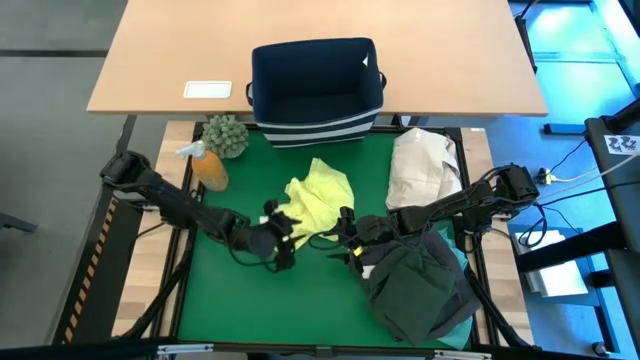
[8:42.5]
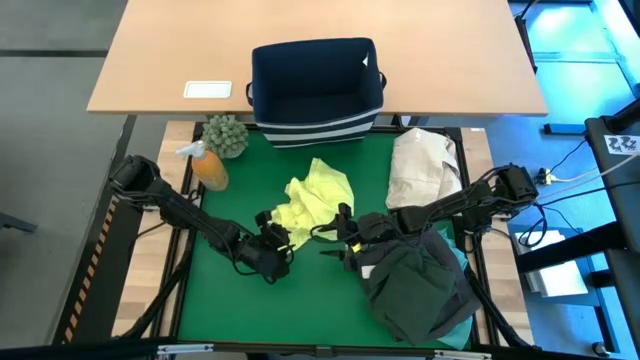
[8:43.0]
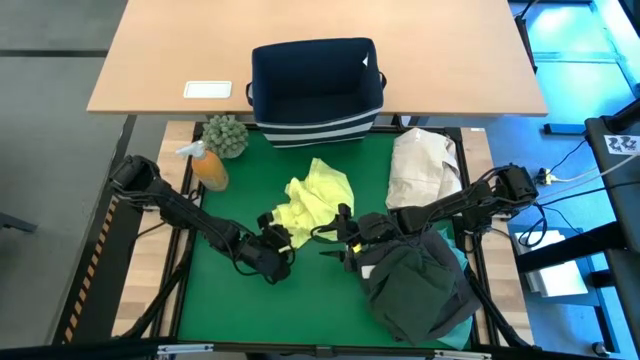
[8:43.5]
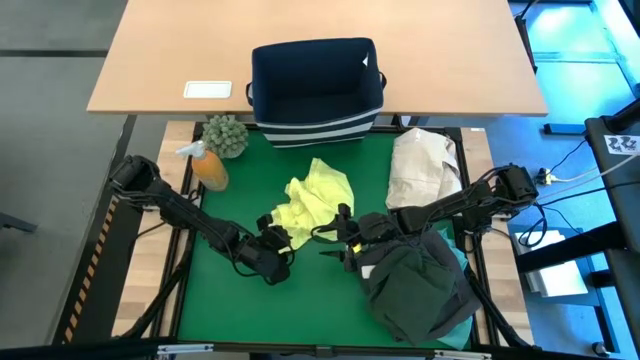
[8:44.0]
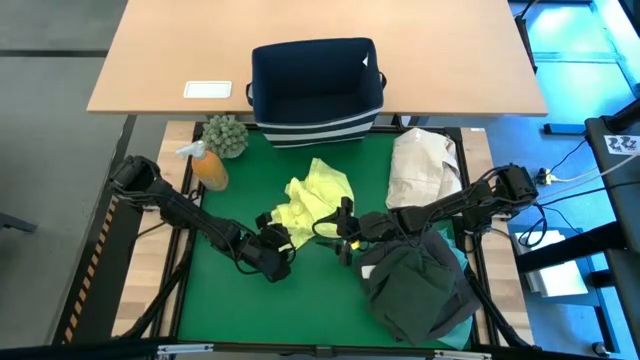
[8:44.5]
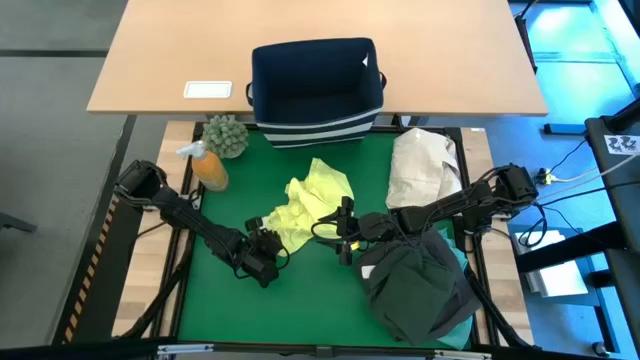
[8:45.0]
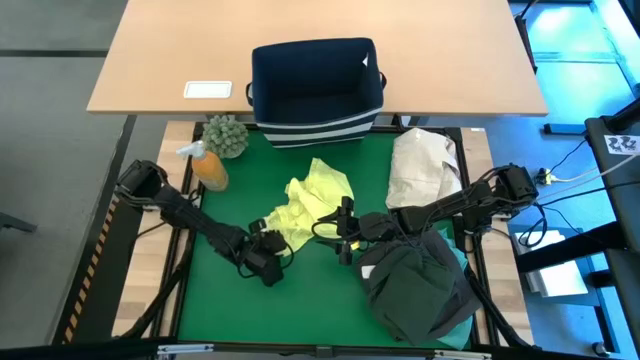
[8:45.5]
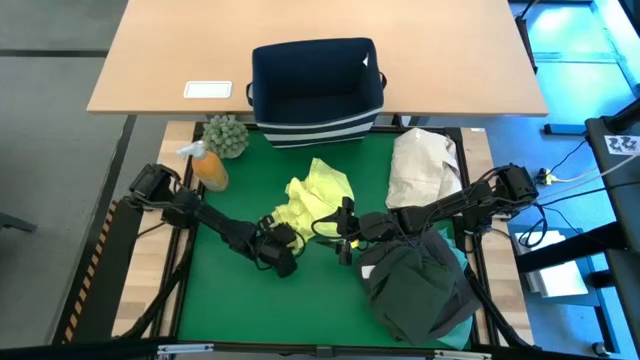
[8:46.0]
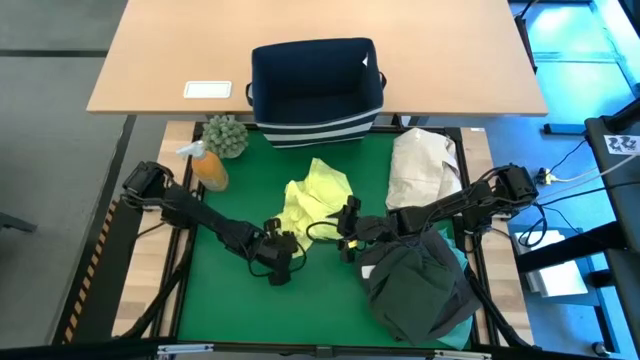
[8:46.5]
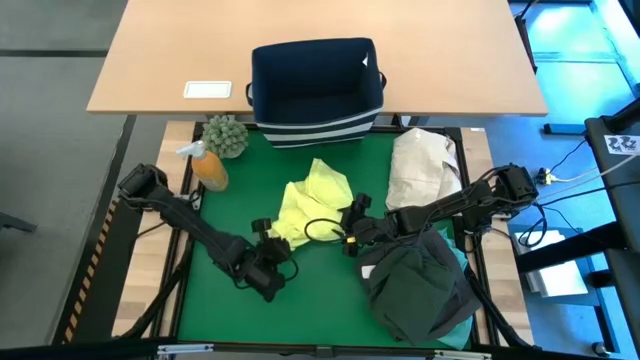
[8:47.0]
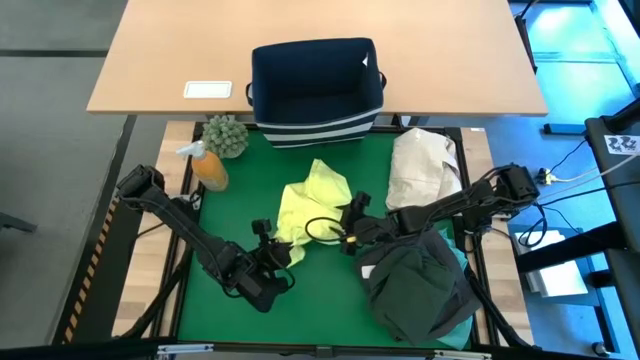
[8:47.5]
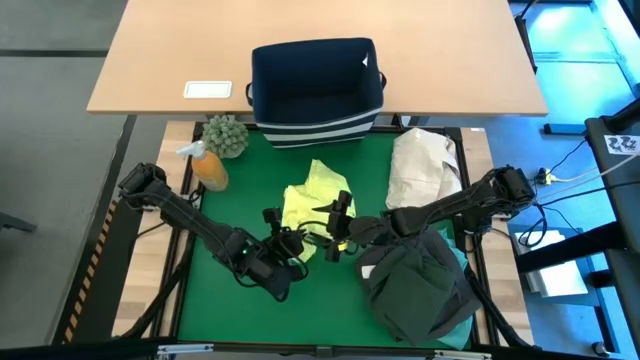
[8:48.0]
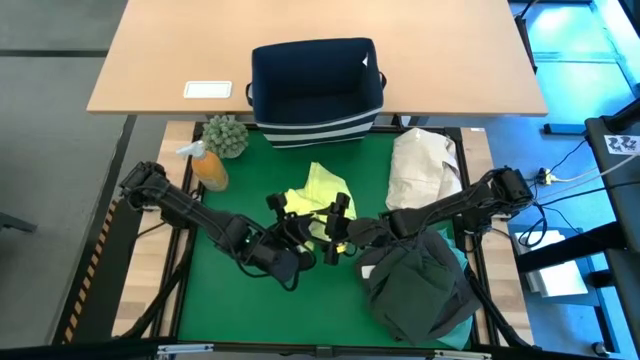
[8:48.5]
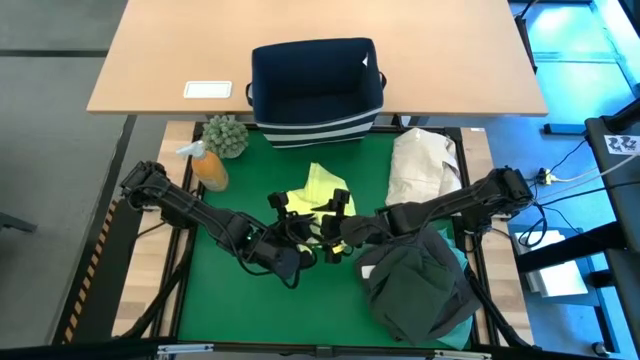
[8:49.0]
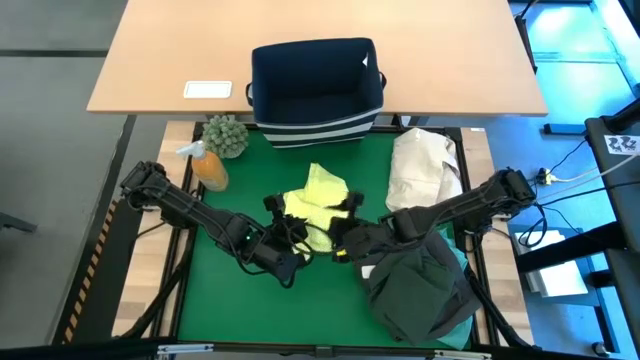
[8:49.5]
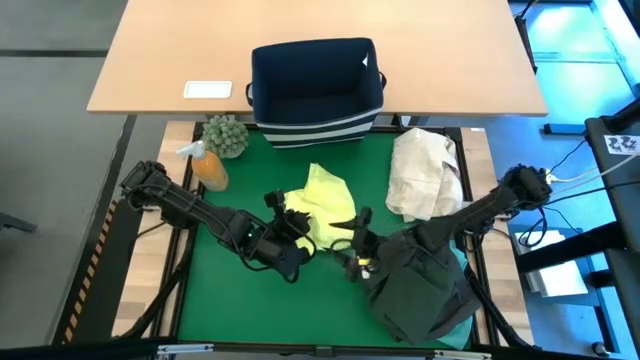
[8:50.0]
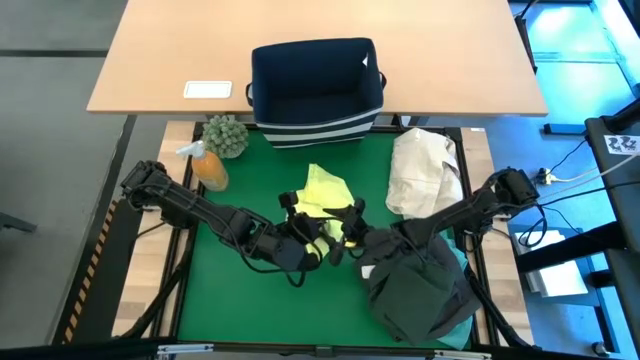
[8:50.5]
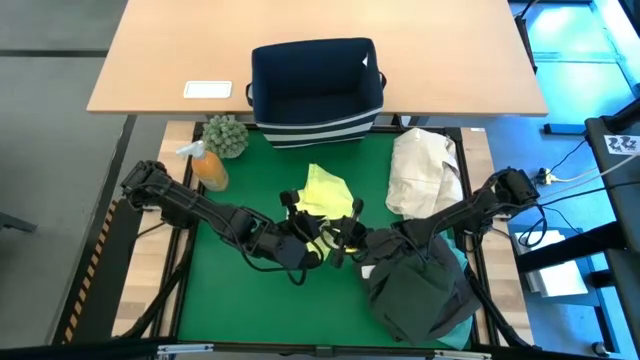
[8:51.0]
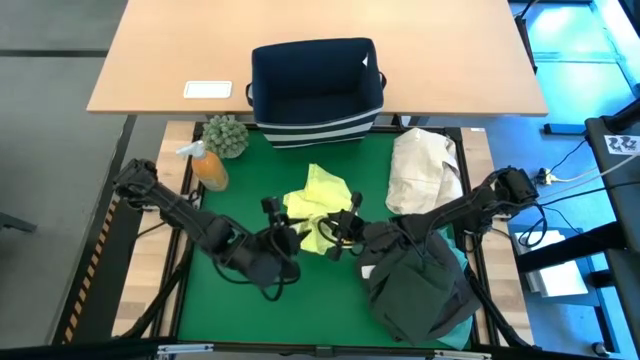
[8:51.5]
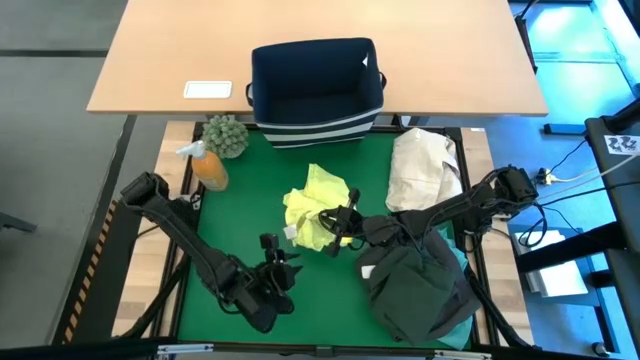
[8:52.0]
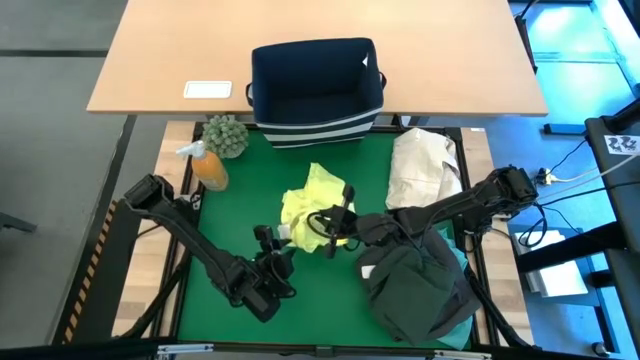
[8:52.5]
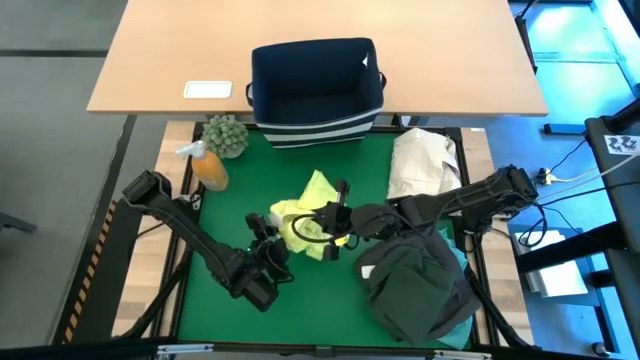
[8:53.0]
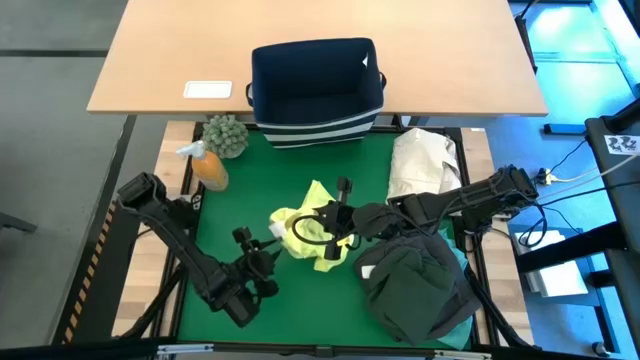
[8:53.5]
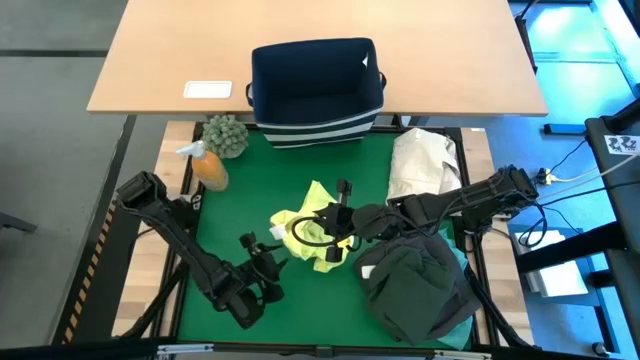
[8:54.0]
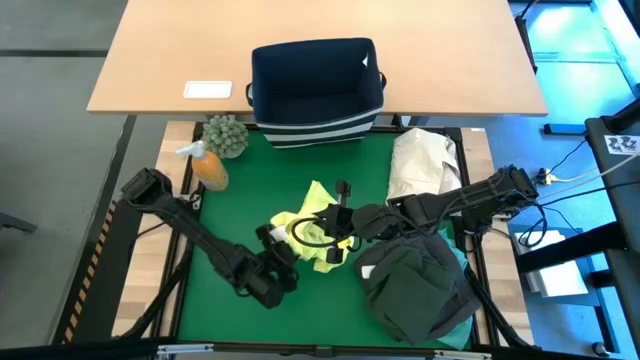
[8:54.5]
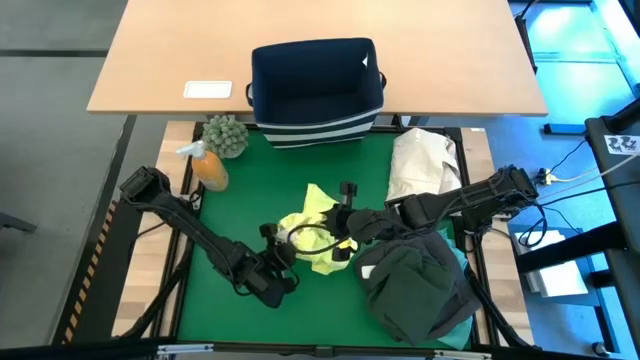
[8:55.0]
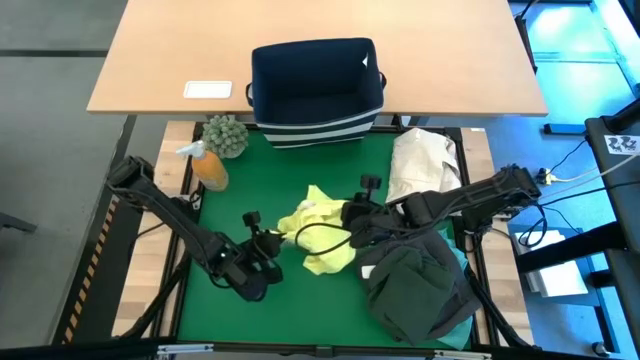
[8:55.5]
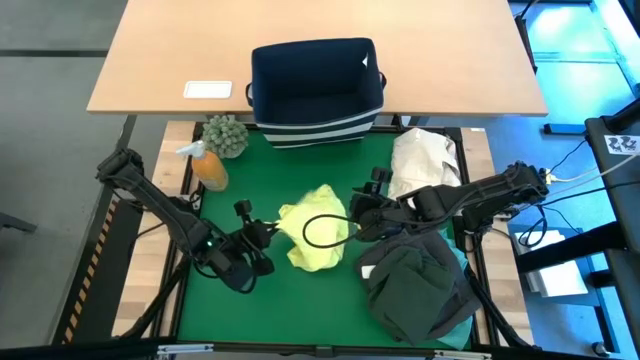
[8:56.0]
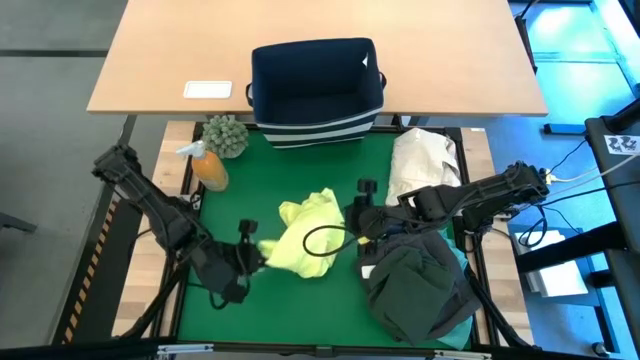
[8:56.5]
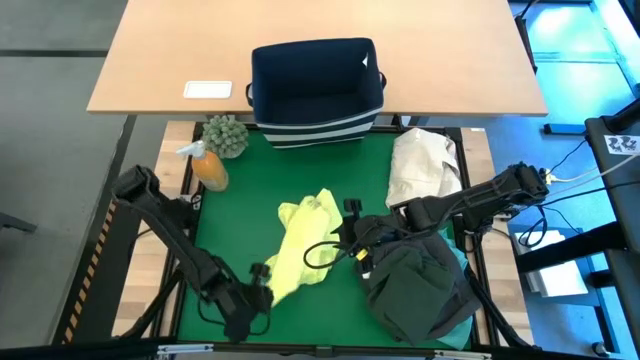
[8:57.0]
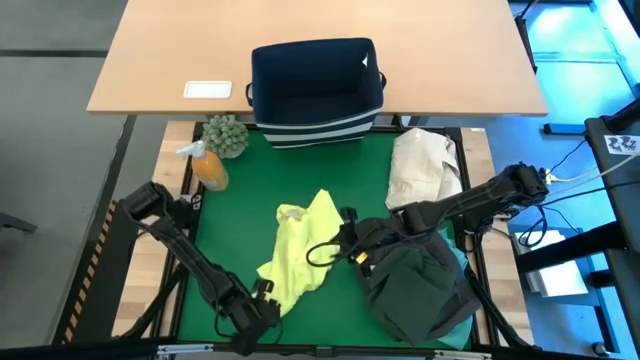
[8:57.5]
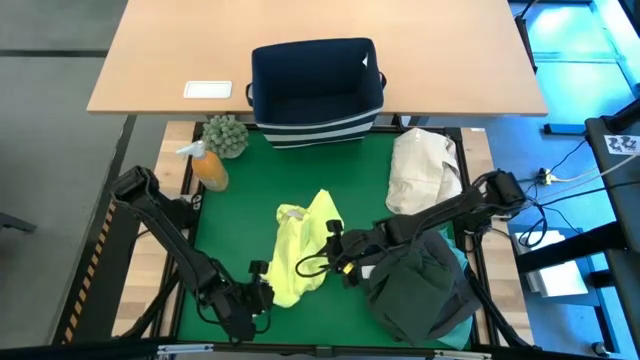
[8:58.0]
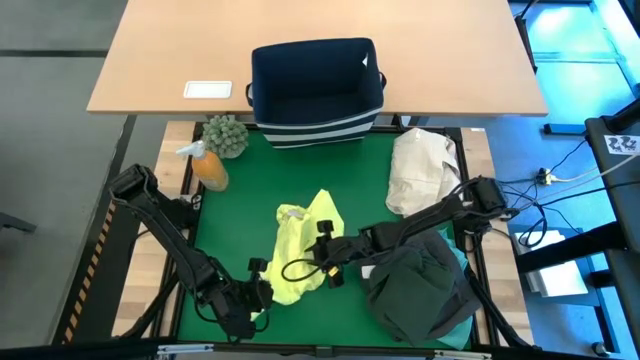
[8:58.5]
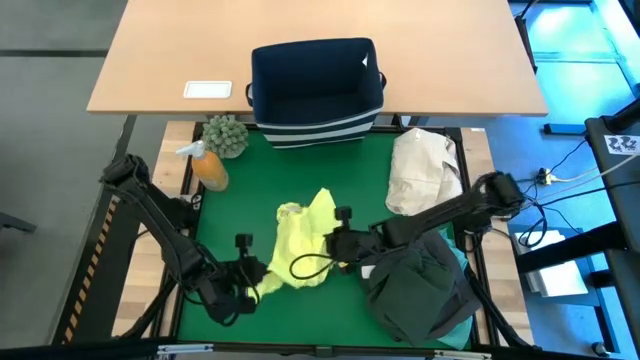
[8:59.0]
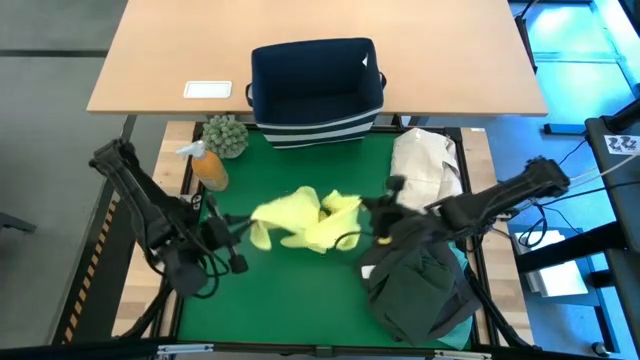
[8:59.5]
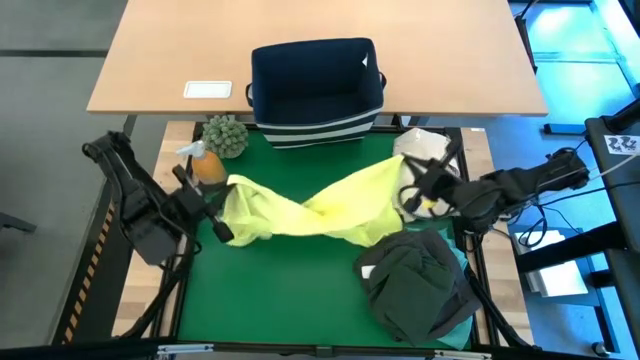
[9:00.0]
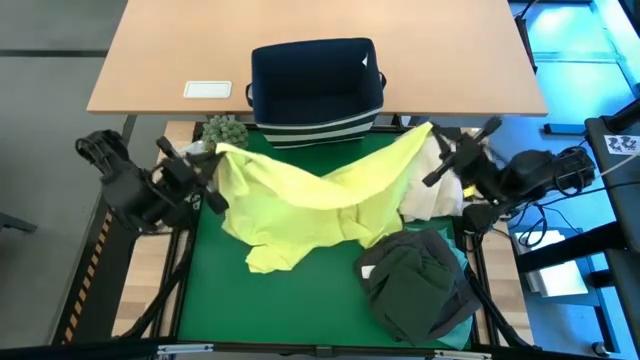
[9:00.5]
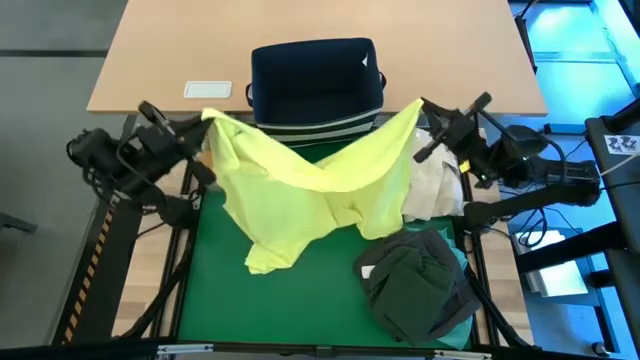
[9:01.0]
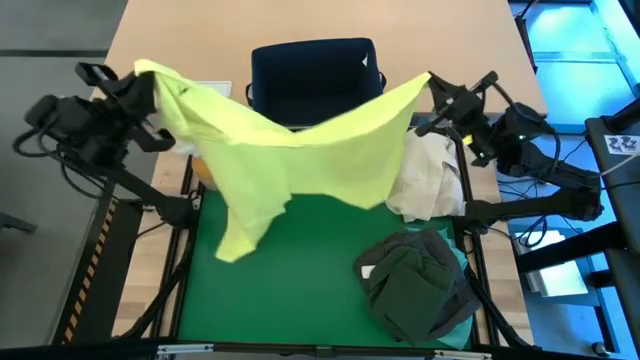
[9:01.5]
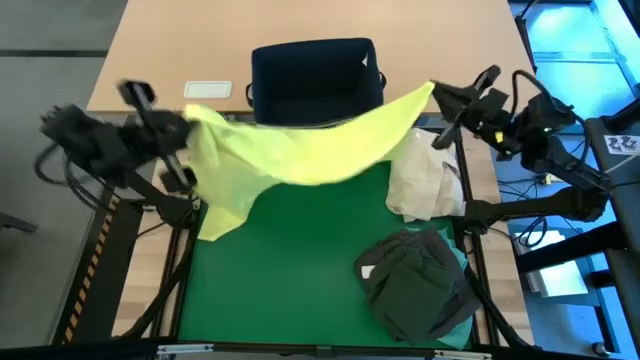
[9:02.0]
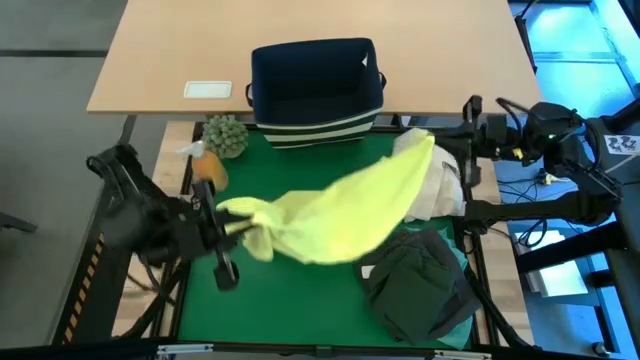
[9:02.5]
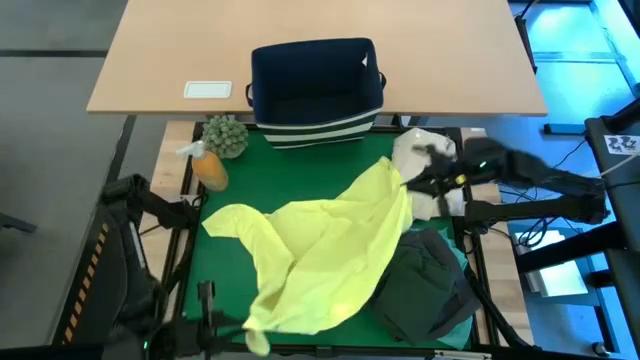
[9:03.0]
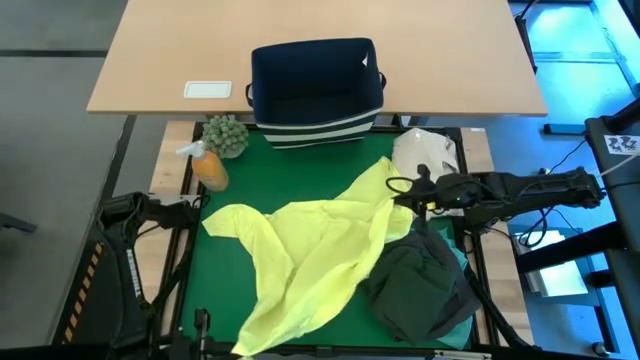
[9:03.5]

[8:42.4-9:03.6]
Task: Fold laundry
Fold the yellow shirt on the table
